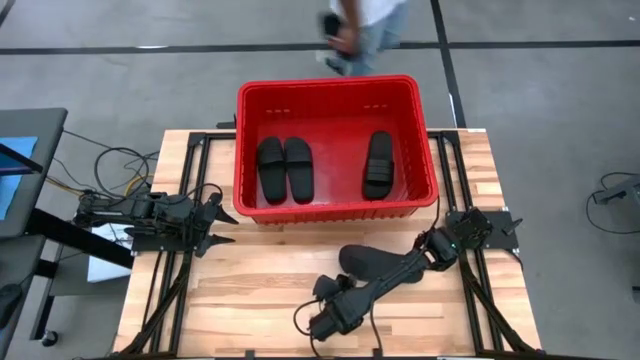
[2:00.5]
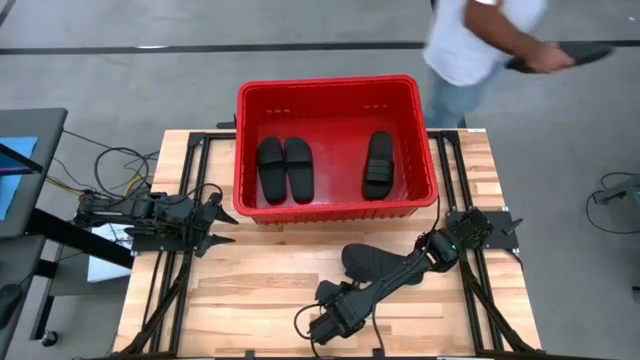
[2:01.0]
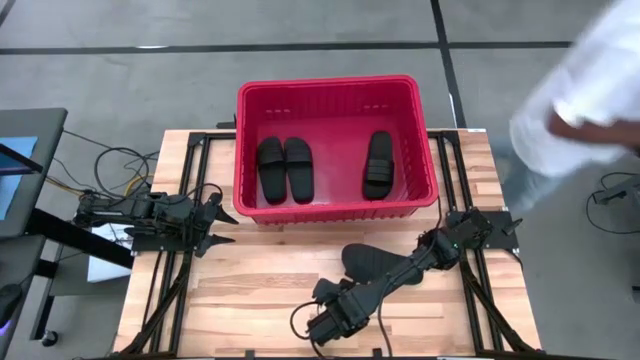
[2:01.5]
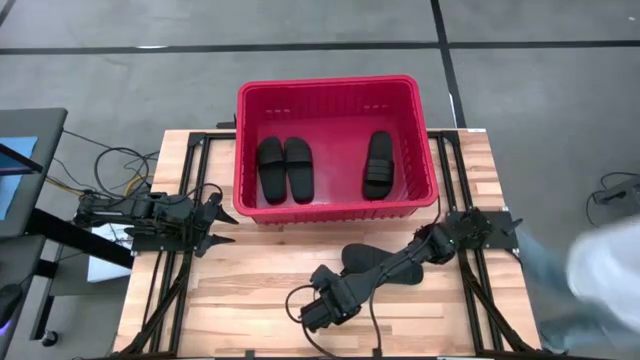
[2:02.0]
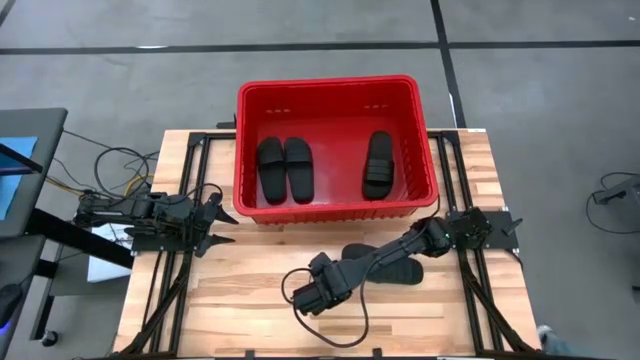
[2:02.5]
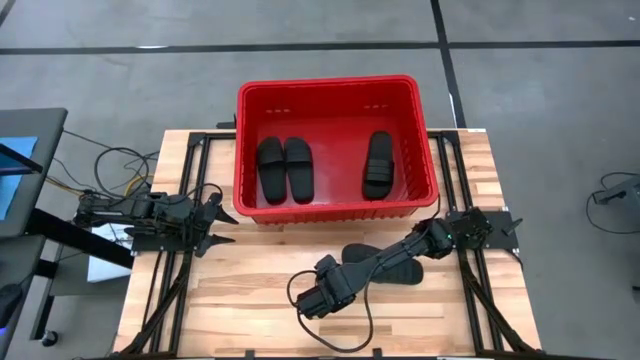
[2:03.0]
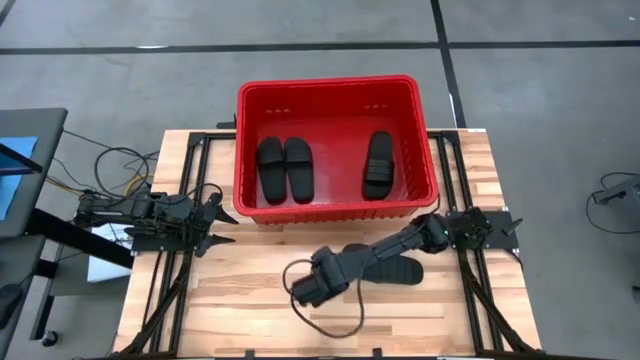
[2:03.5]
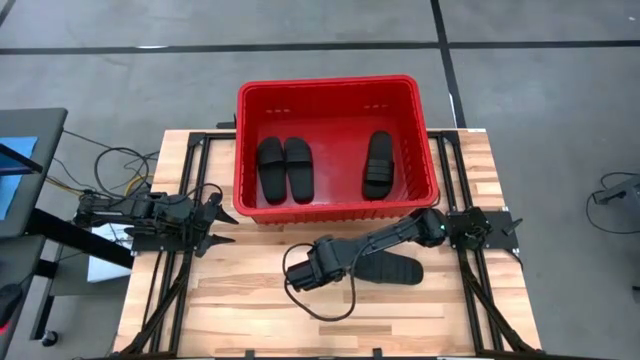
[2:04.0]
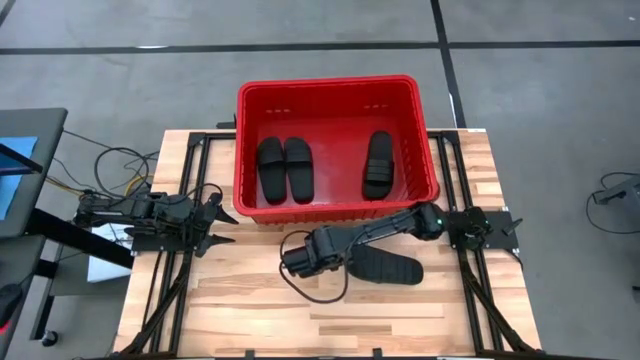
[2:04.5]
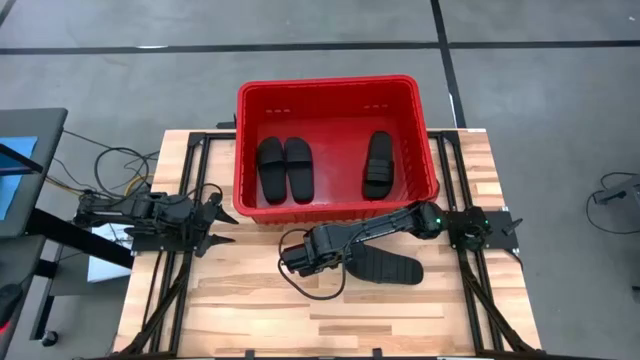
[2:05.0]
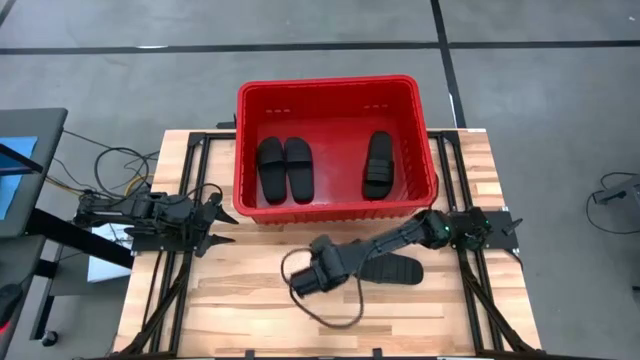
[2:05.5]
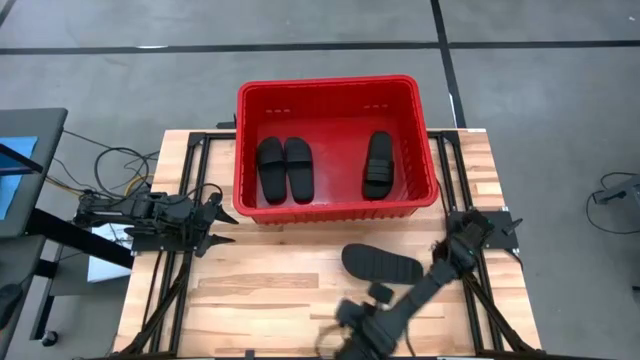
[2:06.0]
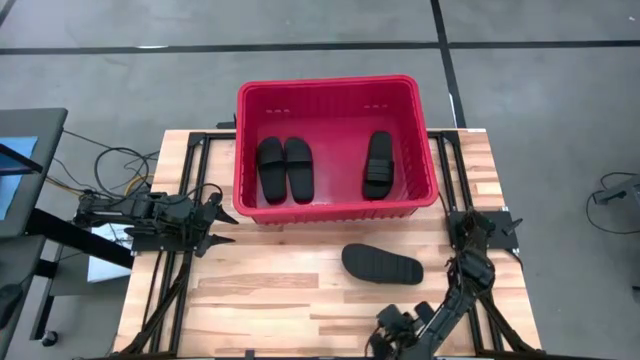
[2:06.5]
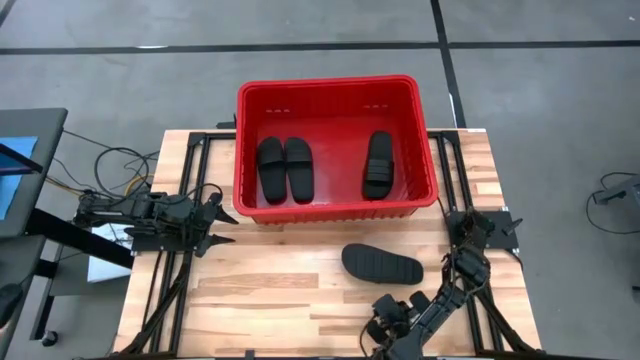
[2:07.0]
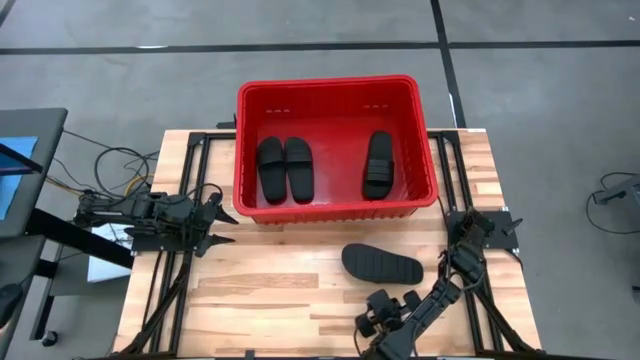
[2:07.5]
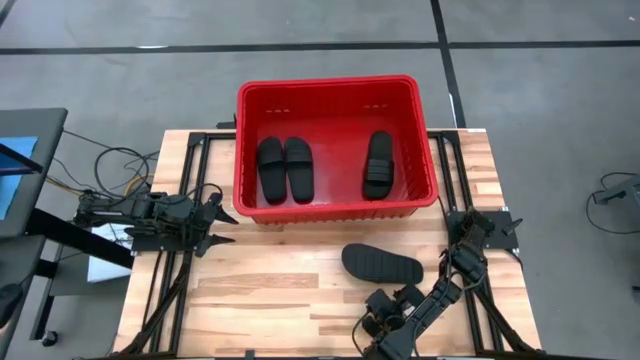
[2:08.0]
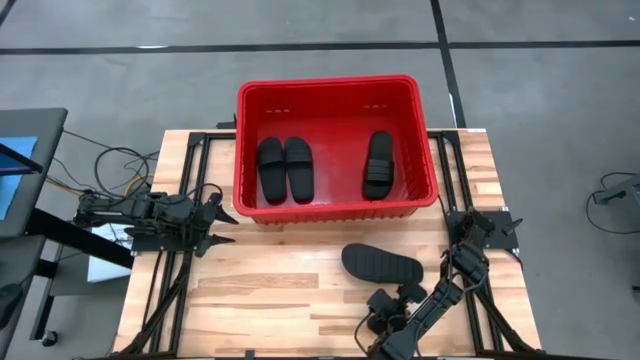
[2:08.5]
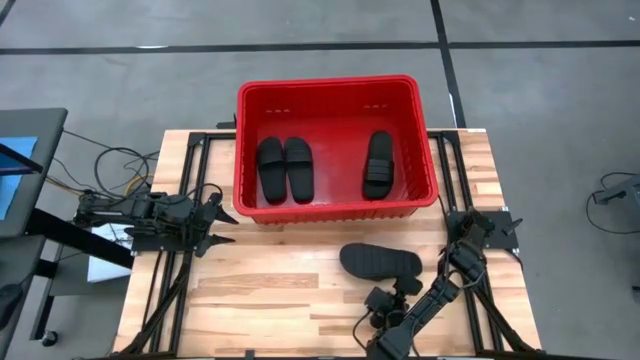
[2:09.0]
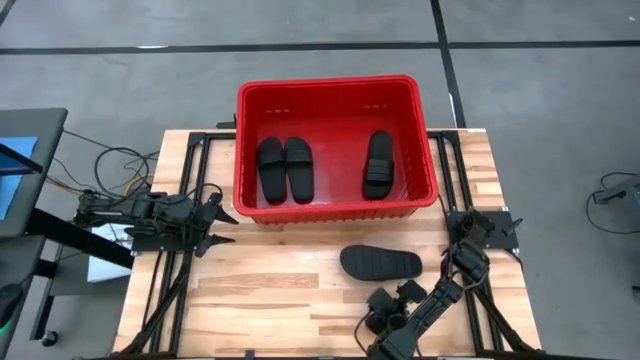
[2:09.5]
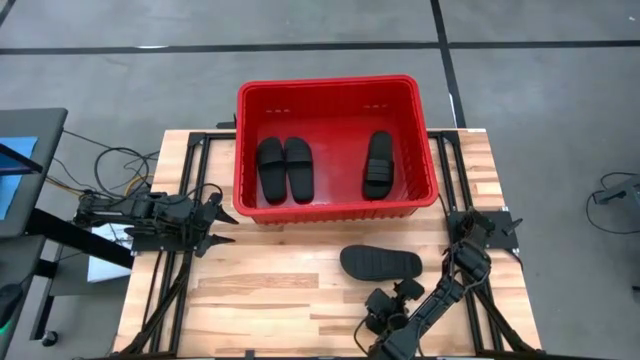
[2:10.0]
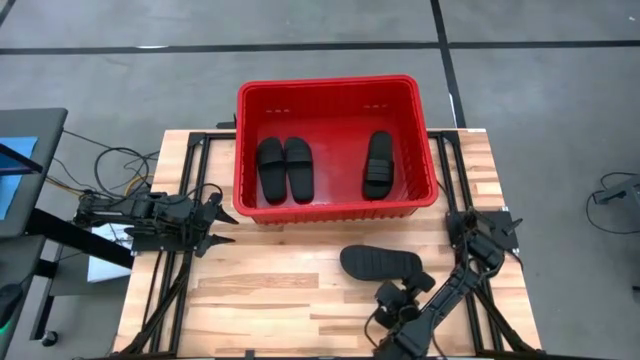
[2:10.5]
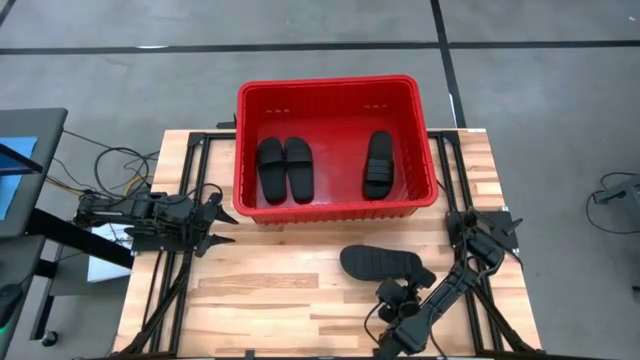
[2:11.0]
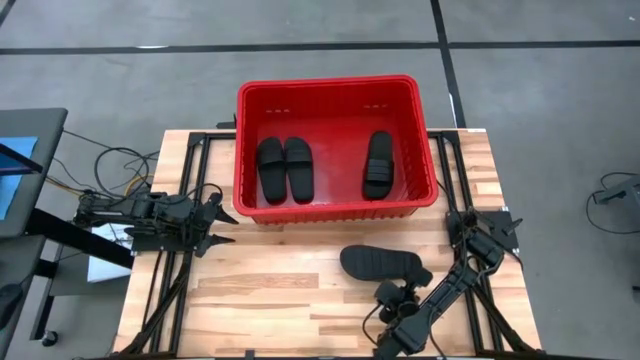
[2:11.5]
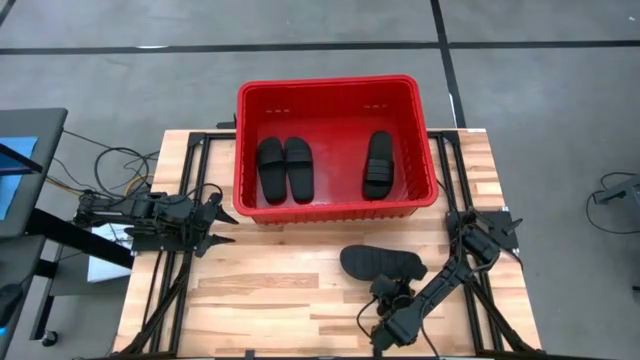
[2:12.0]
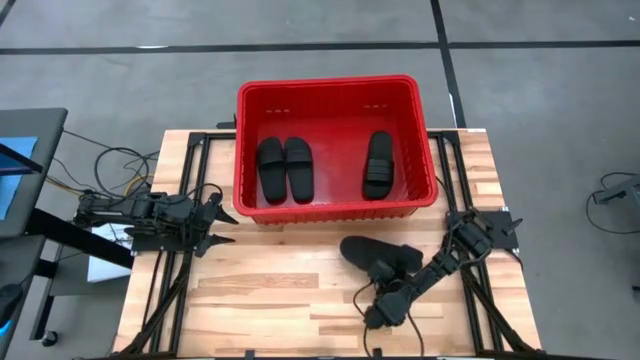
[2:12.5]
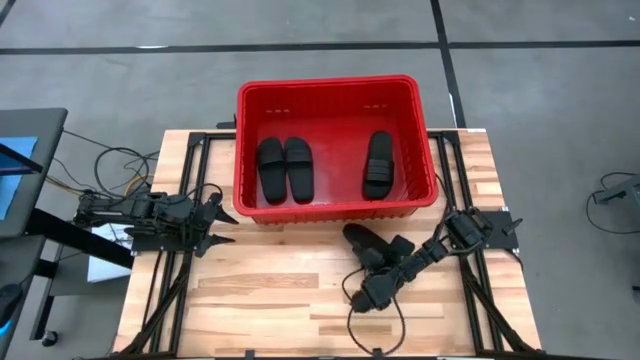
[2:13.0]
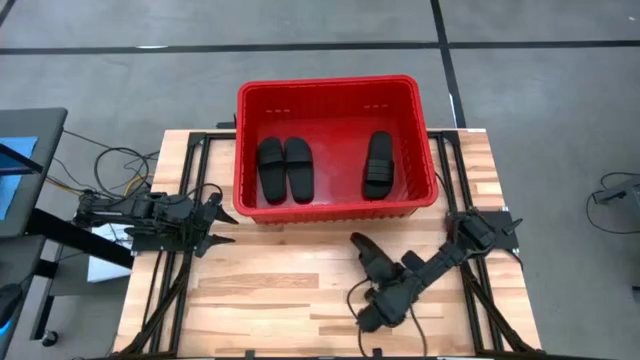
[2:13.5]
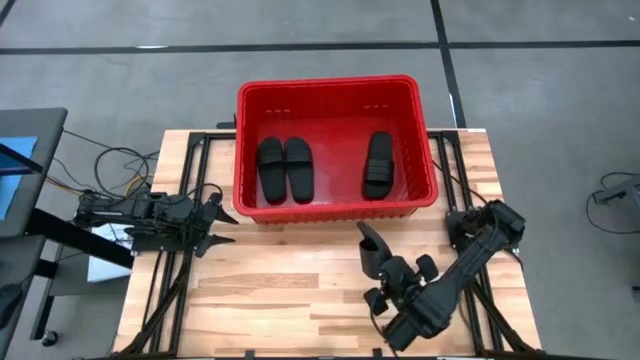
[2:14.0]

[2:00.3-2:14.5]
Task: Pick and place slides into bin
Put the black slides into the red bin

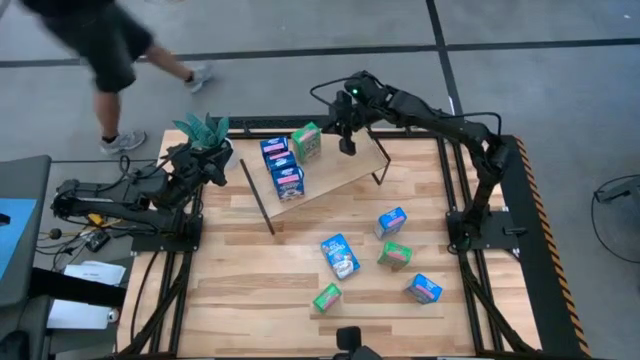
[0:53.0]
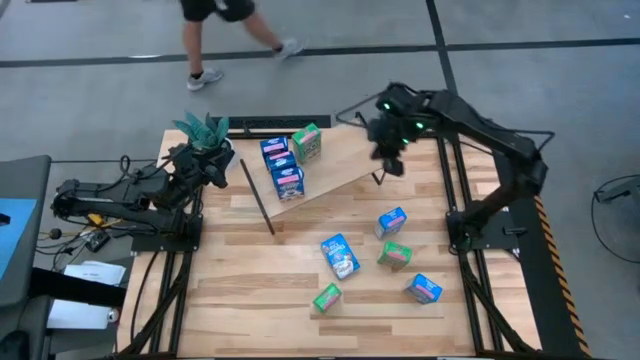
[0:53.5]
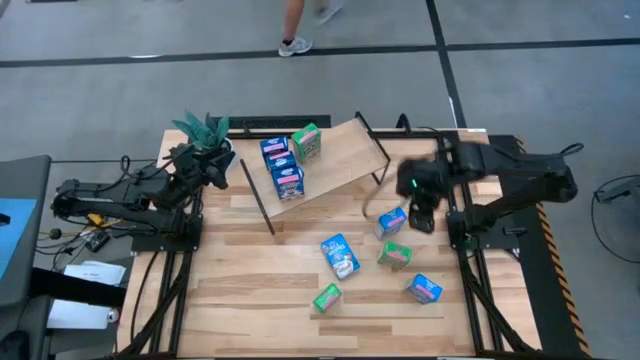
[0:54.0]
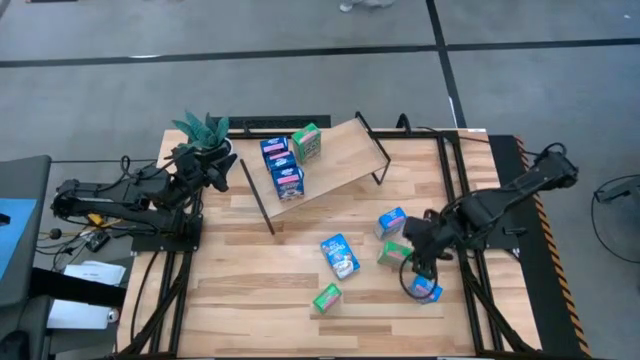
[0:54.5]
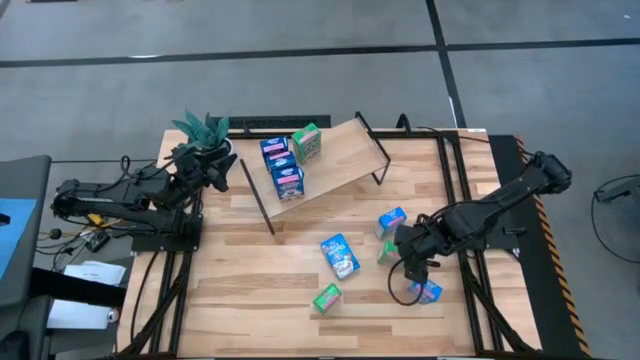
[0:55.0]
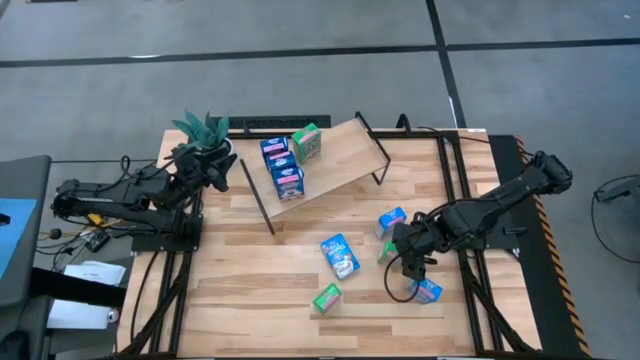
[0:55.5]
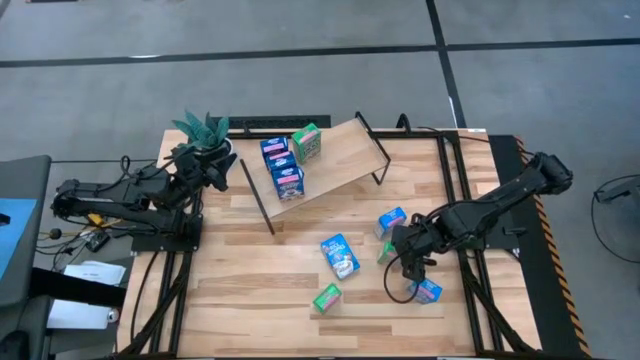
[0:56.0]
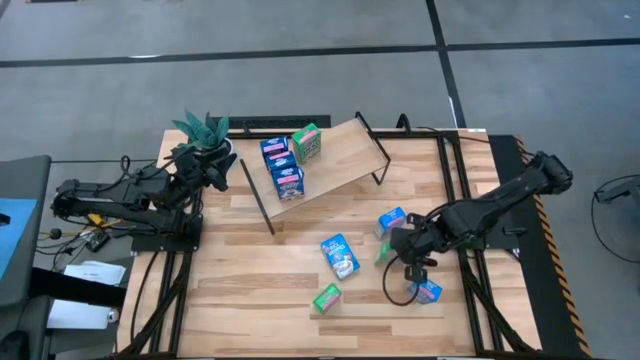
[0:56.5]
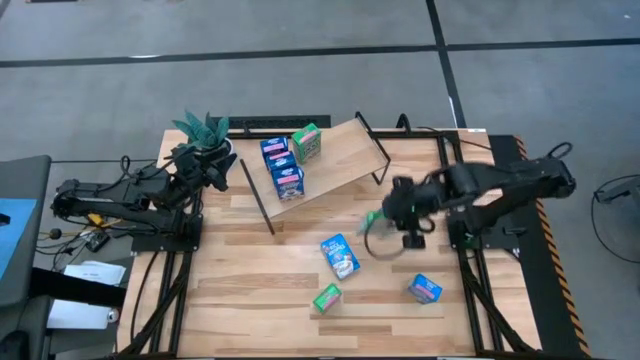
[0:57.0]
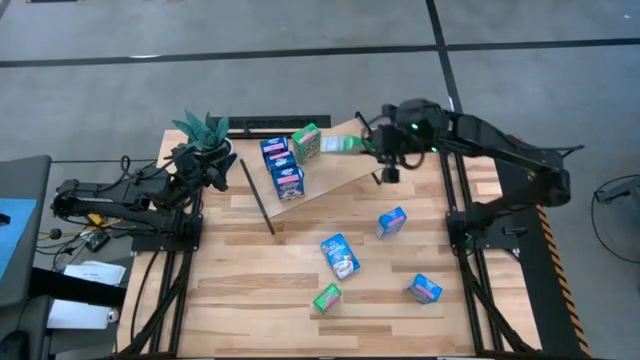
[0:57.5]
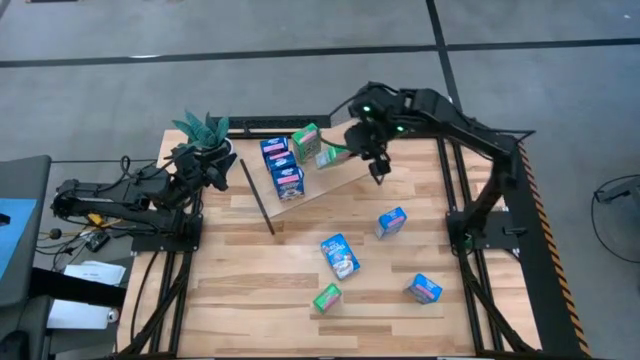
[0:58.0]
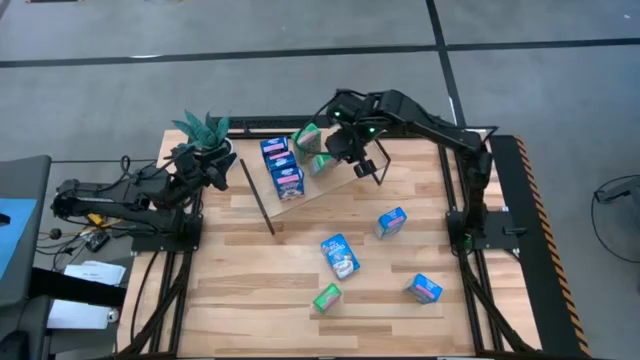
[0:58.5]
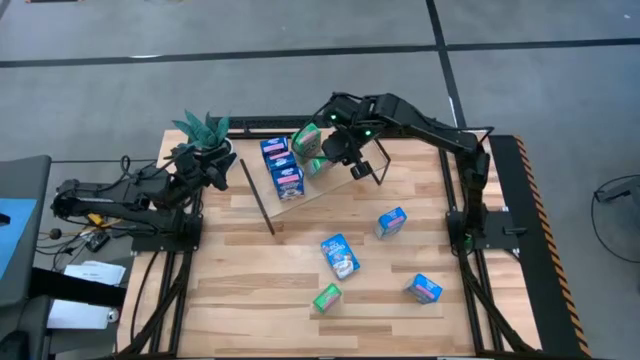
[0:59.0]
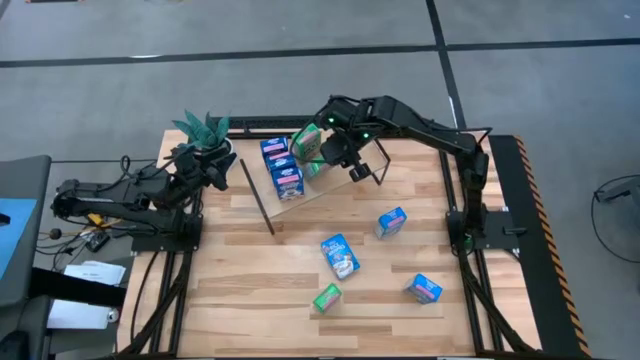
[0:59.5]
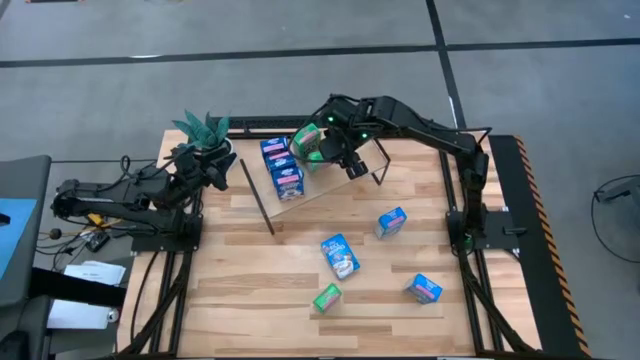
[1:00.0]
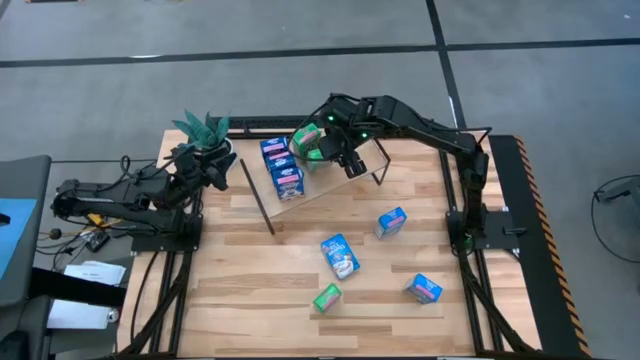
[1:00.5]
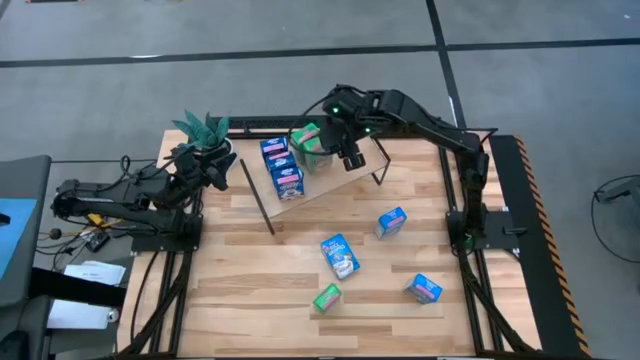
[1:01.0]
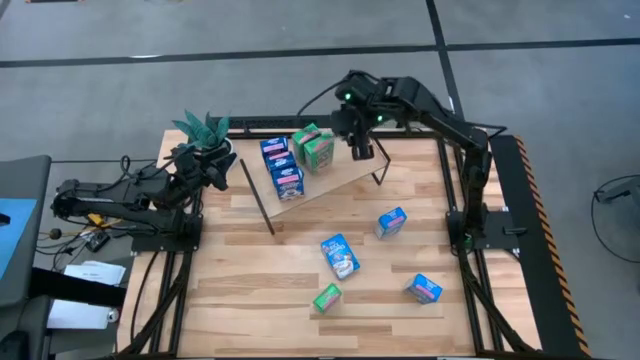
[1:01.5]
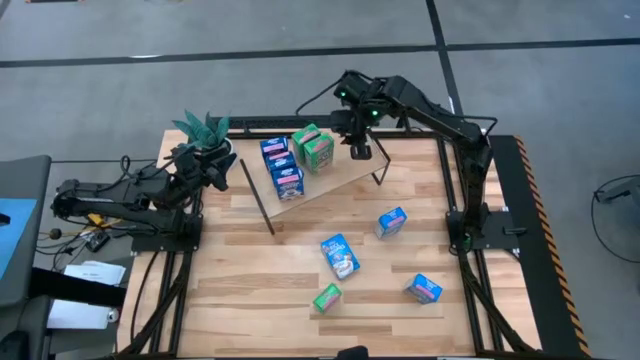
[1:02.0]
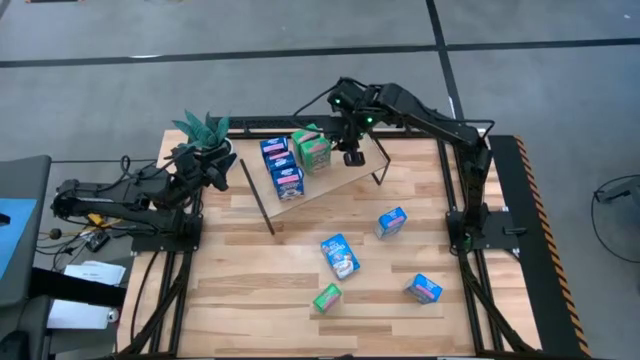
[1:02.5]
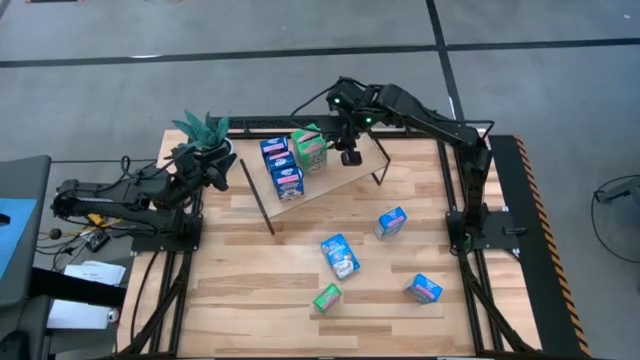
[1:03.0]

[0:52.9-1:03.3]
Task: Stack cereal on shelf
Put the right green cereal box on the shelf and align it with the other green cereal box
